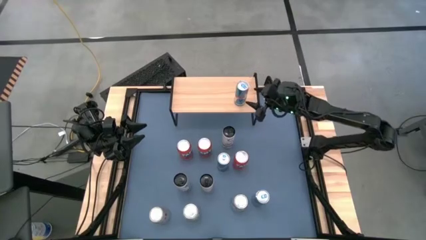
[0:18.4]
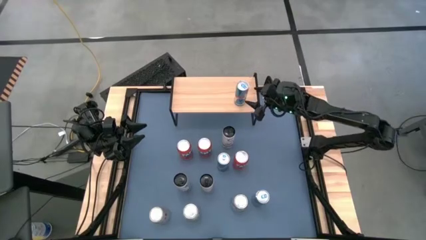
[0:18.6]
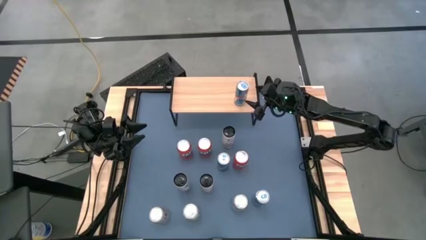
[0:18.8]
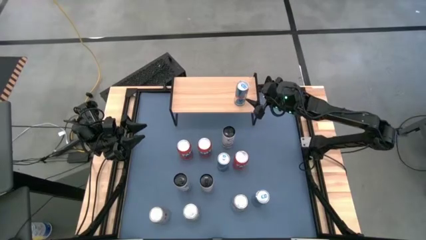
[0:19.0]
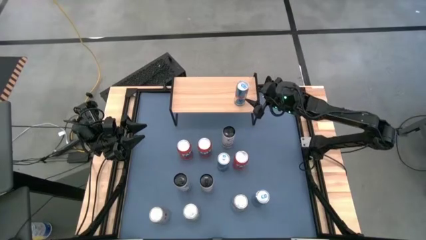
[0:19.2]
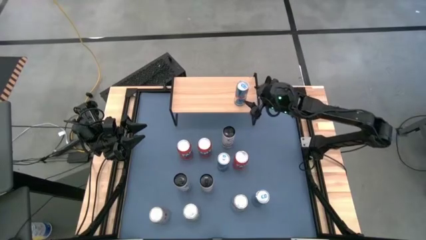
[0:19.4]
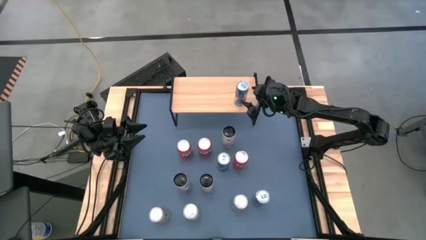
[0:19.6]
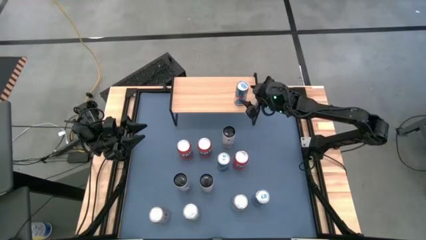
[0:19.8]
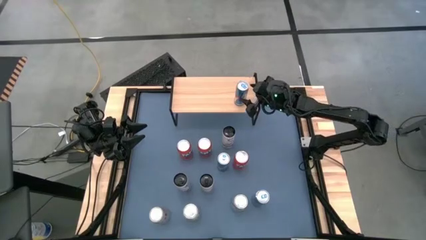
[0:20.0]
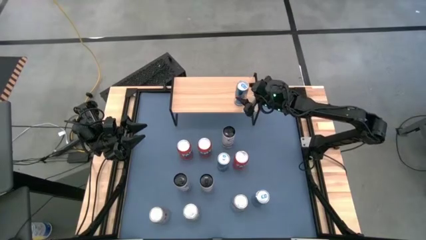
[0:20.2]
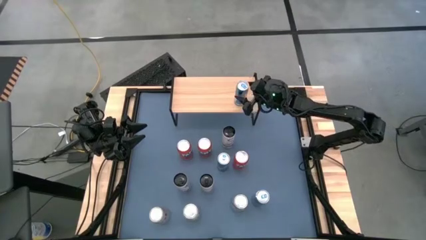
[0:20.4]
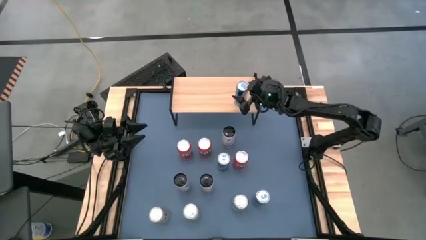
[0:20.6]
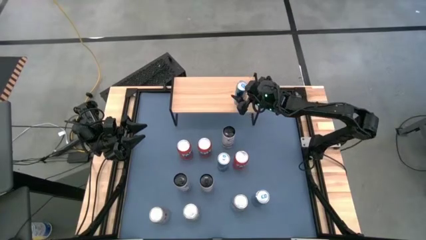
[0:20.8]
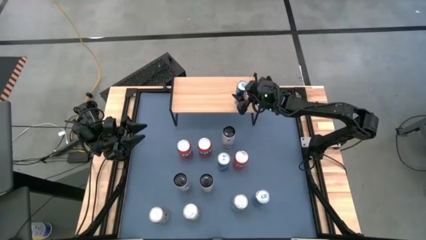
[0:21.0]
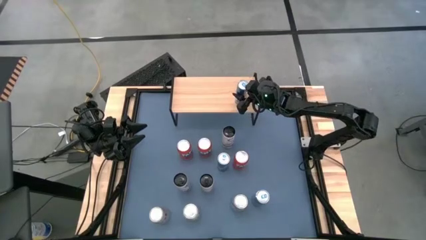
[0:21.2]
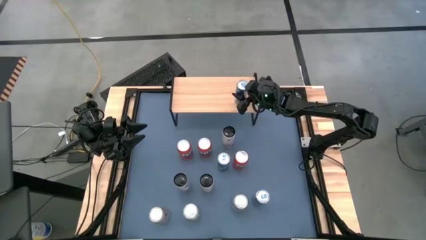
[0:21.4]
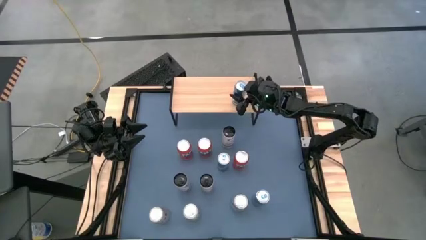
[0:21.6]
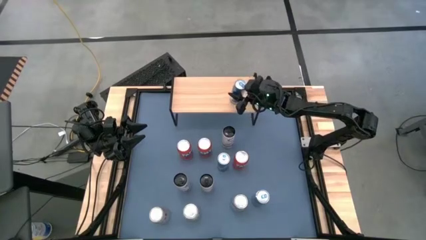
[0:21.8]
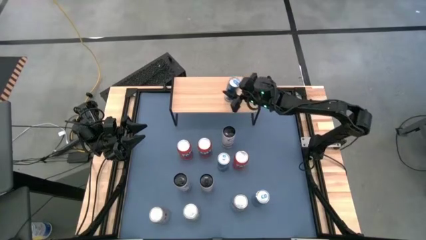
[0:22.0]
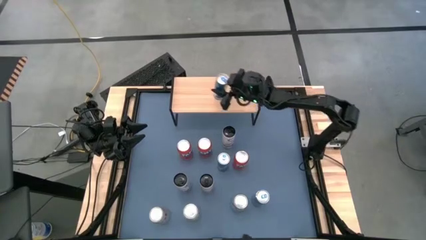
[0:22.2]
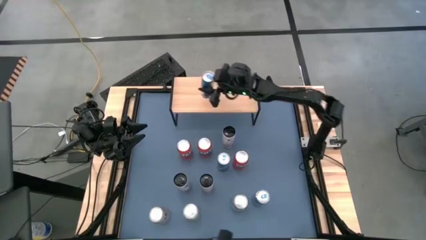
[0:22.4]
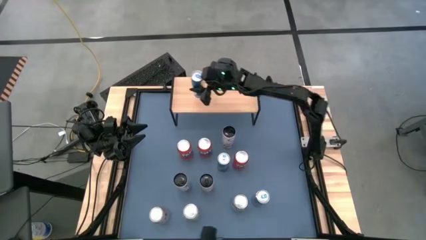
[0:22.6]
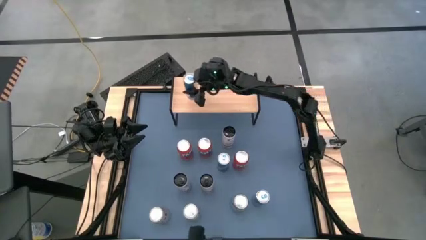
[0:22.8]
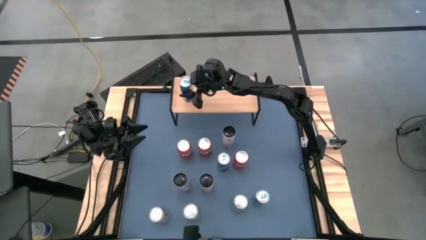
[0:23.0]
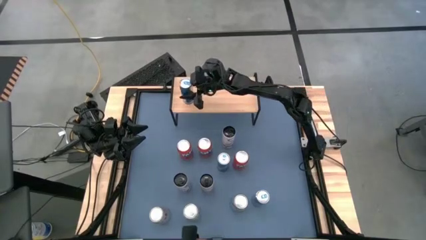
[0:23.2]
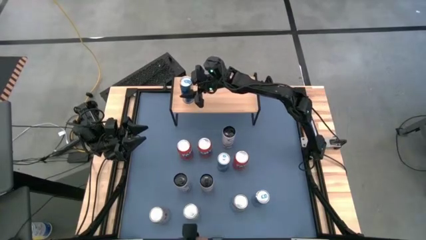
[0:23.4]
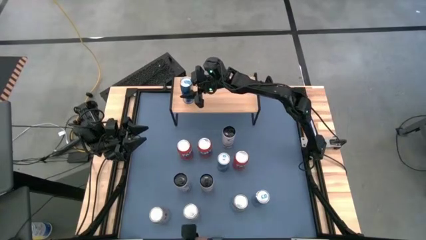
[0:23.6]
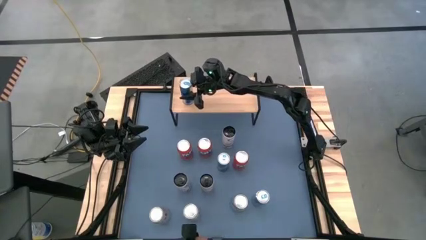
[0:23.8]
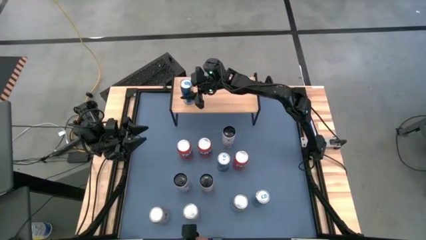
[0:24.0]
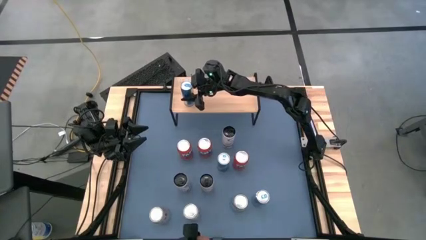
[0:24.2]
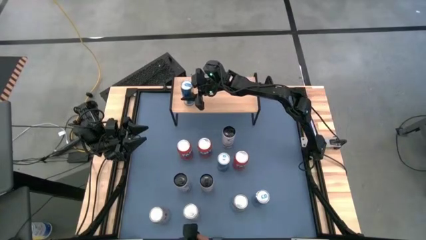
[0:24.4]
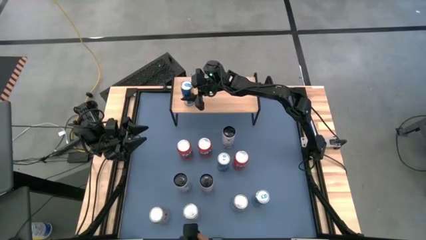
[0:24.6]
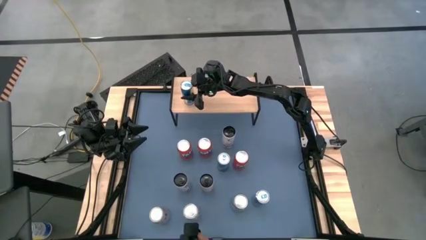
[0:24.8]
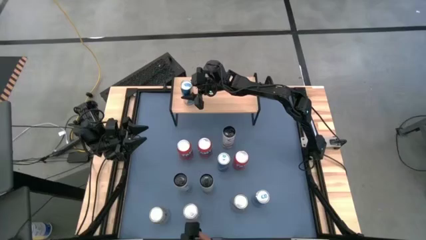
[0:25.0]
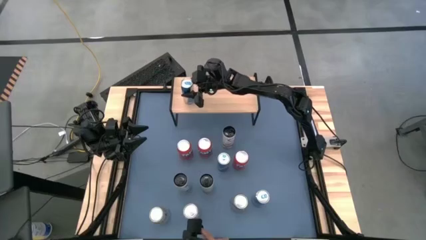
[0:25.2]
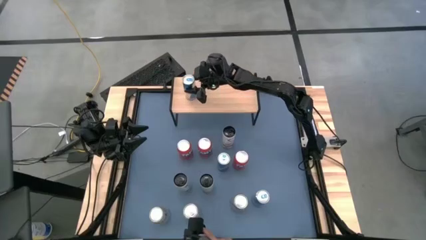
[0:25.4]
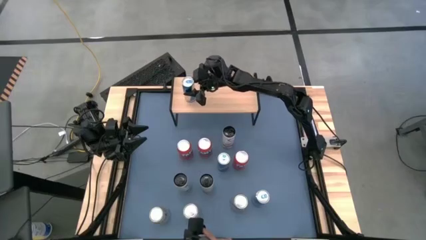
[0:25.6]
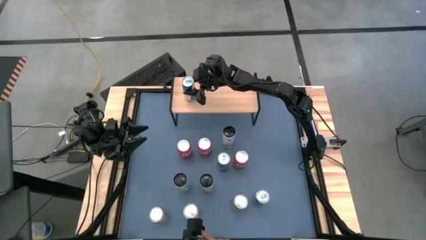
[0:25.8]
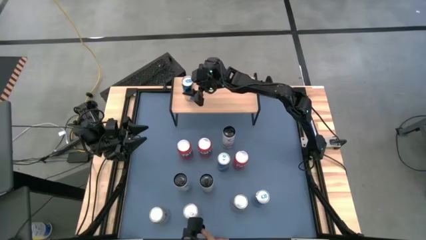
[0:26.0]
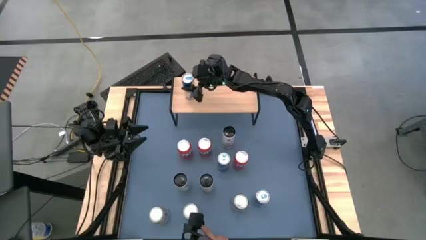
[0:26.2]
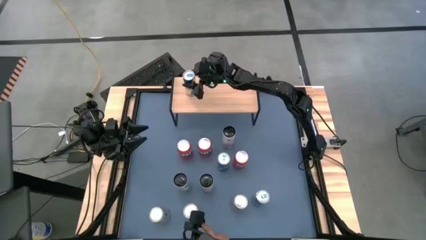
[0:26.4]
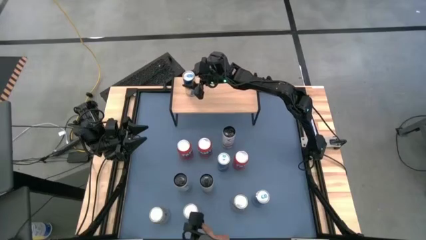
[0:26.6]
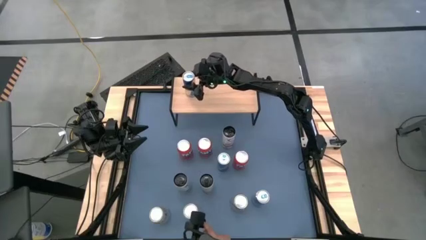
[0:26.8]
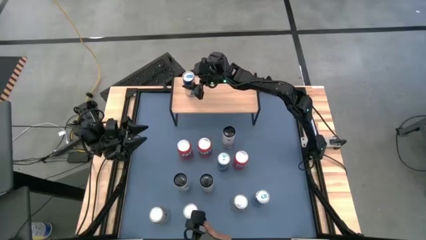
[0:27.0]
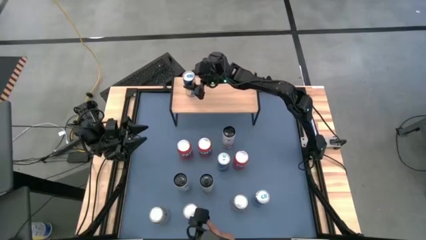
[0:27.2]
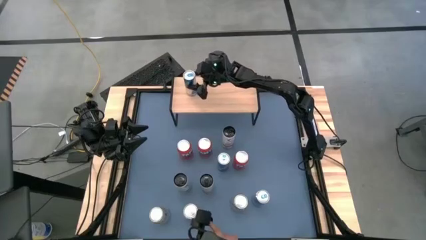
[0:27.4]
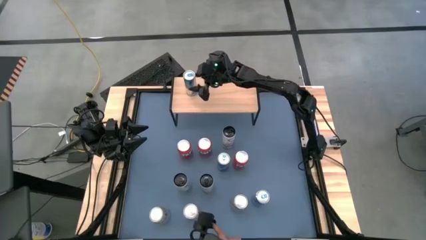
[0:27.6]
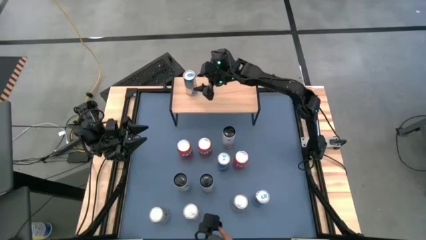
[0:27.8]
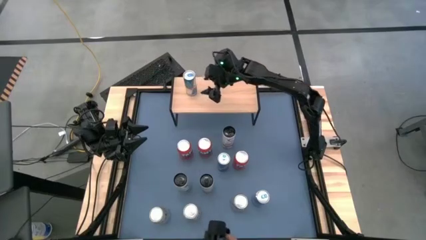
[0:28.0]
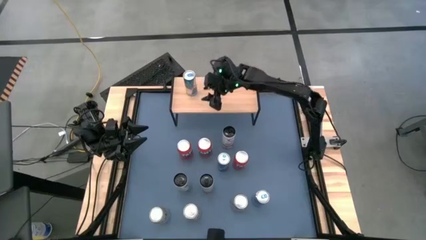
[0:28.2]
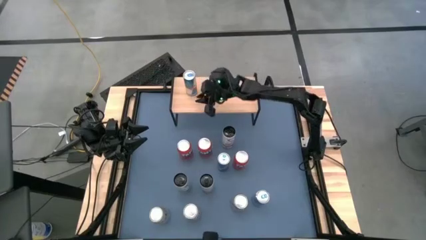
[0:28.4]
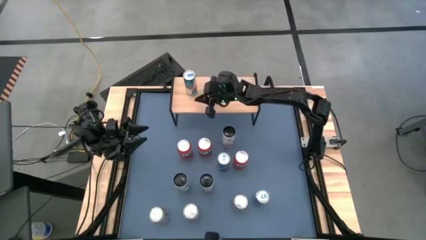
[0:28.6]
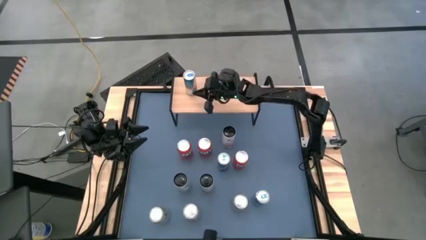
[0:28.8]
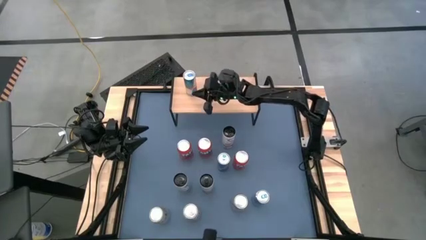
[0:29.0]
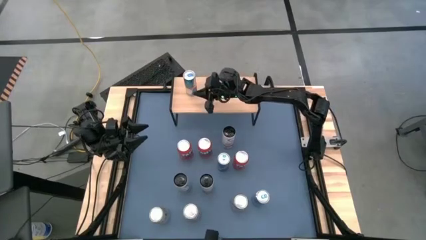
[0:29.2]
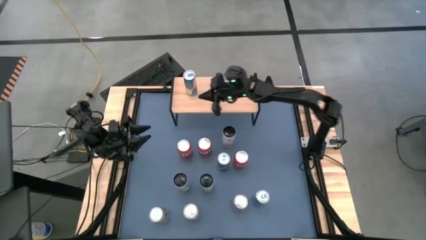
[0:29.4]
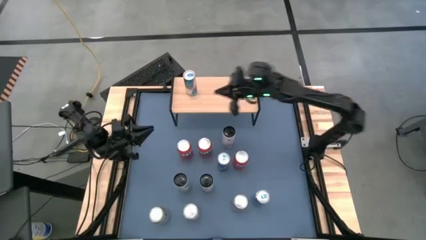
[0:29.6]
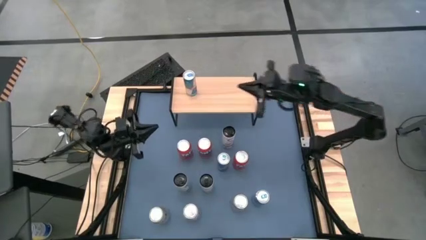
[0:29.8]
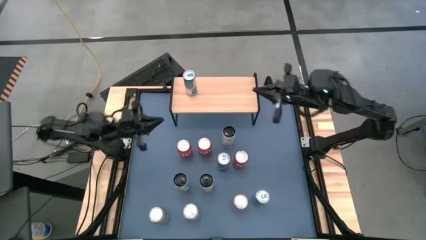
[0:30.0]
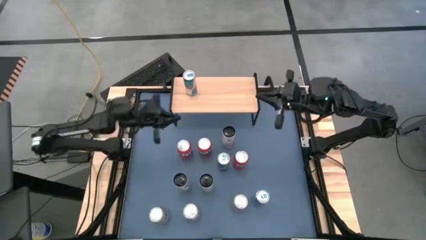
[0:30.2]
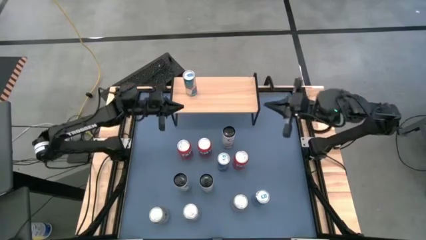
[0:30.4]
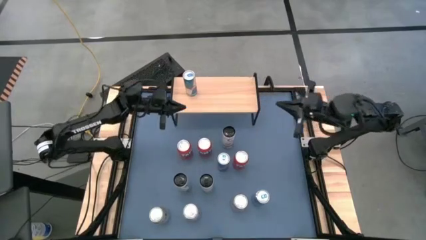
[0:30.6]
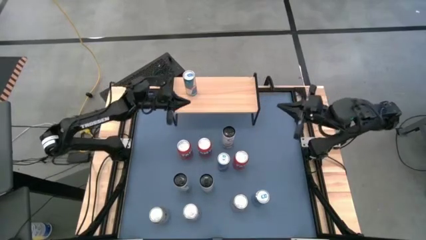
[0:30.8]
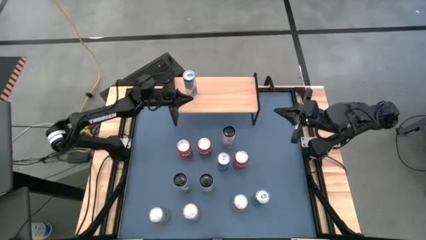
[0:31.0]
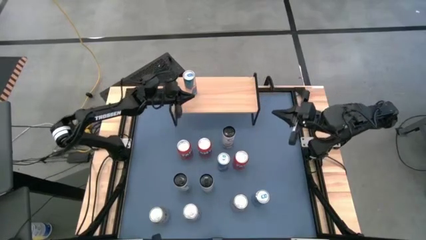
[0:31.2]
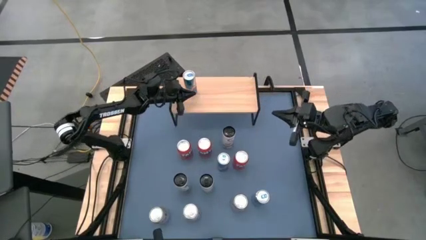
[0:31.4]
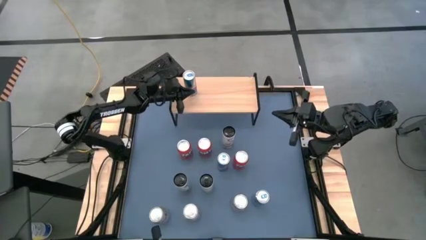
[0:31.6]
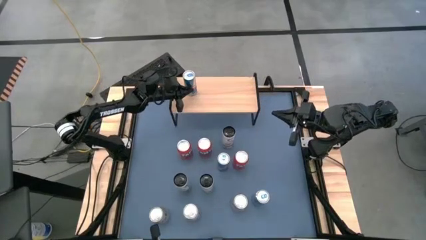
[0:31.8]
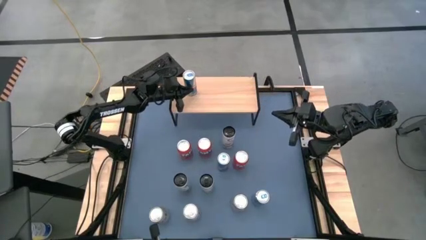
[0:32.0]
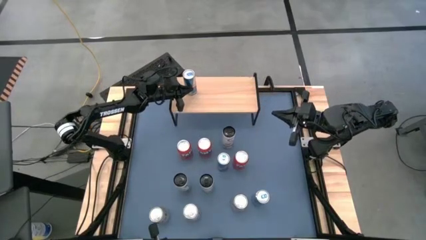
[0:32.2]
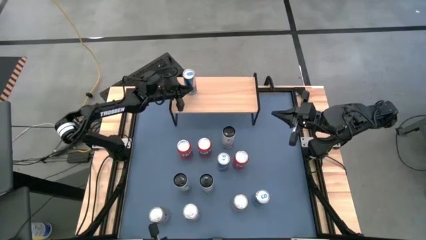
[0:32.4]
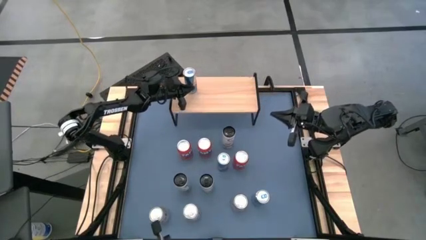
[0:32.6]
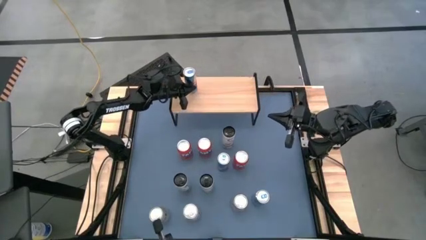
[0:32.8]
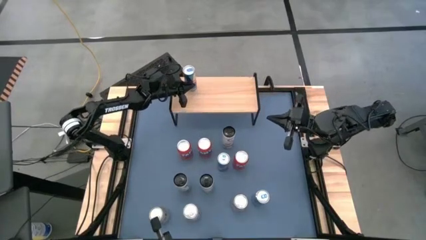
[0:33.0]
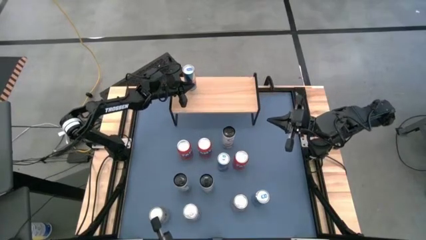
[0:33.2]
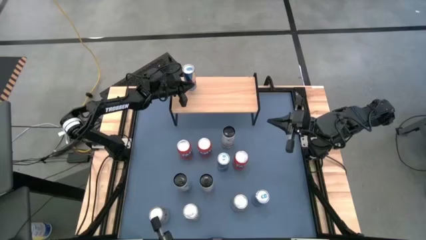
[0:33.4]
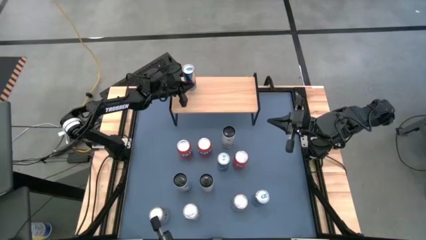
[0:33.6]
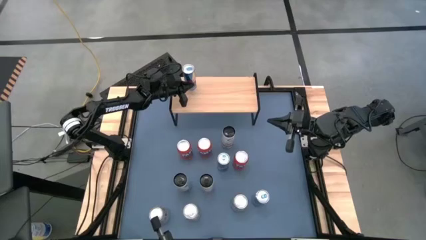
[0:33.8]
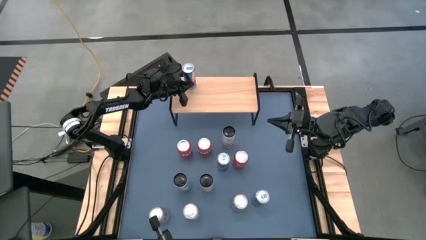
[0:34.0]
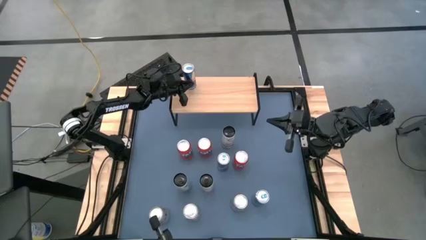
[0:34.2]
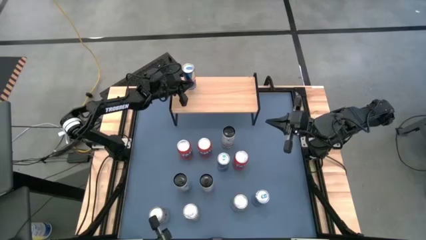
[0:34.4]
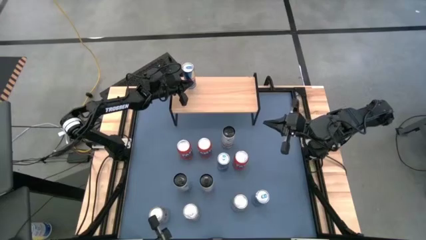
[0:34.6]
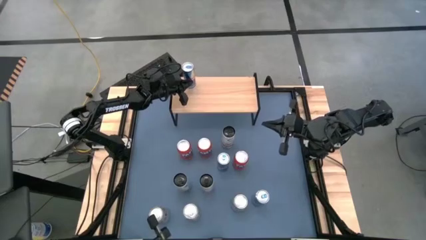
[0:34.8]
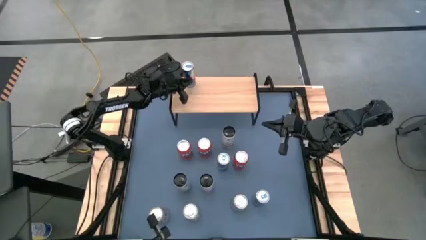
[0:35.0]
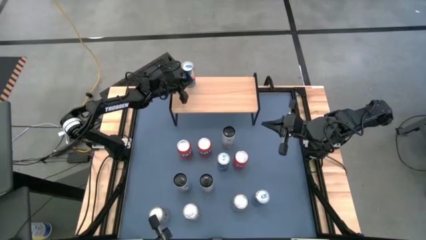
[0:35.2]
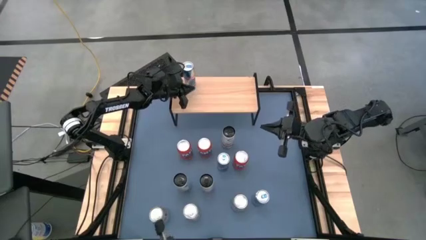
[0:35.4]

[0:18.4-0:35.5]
Task: Place canned beverage on shelf
Put the middle blue soda can on the shelf
